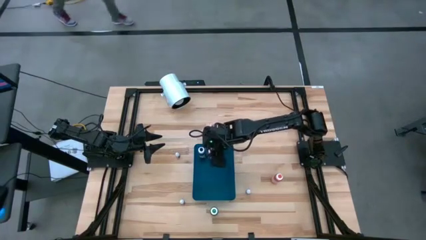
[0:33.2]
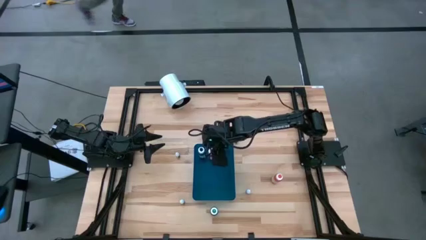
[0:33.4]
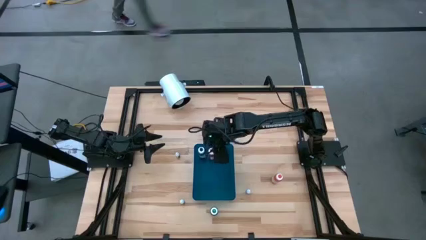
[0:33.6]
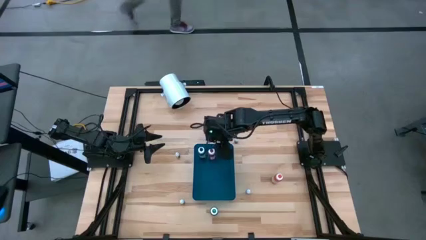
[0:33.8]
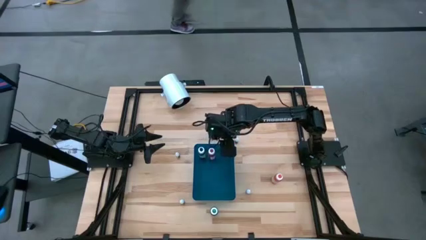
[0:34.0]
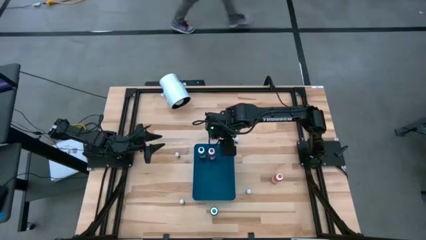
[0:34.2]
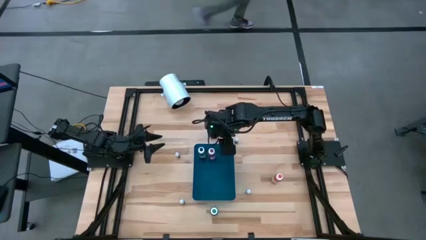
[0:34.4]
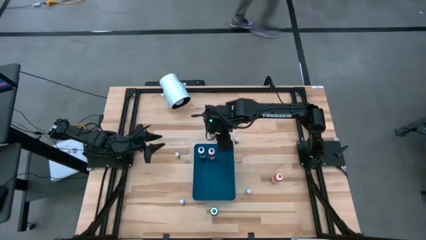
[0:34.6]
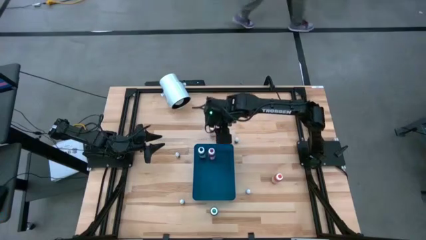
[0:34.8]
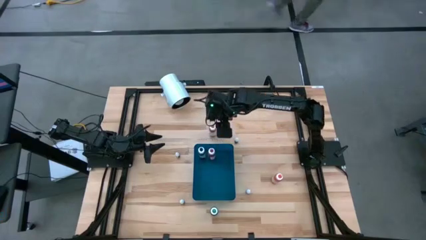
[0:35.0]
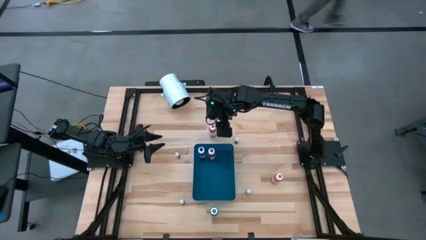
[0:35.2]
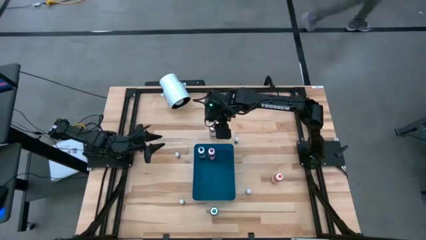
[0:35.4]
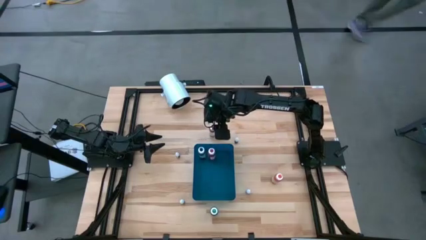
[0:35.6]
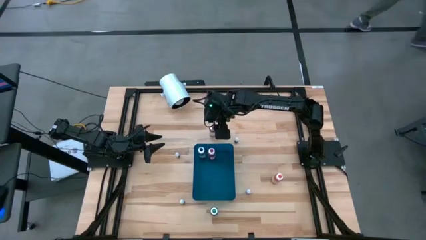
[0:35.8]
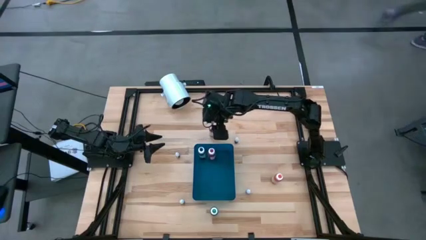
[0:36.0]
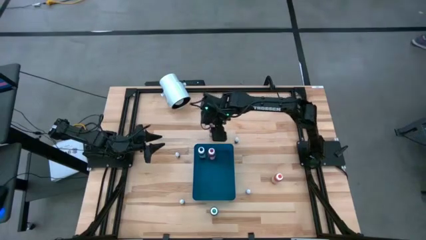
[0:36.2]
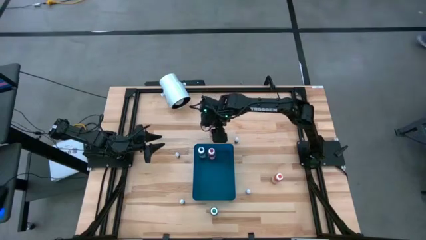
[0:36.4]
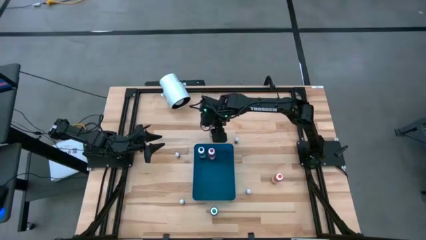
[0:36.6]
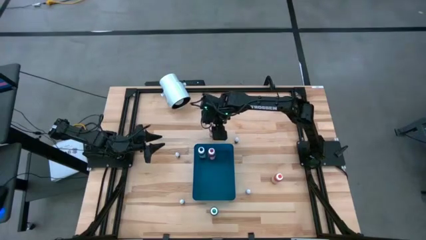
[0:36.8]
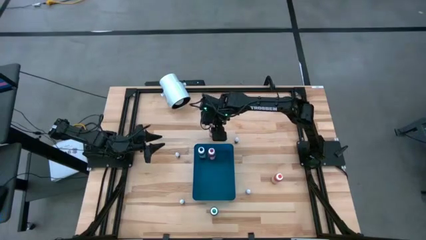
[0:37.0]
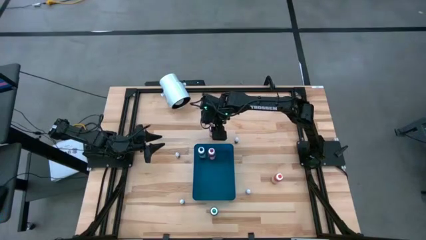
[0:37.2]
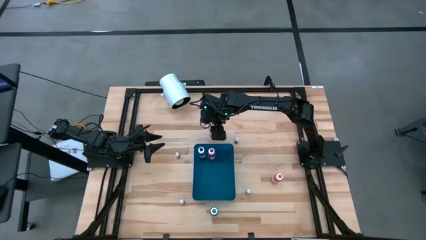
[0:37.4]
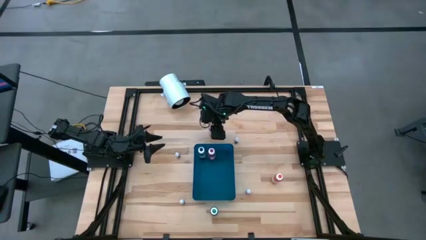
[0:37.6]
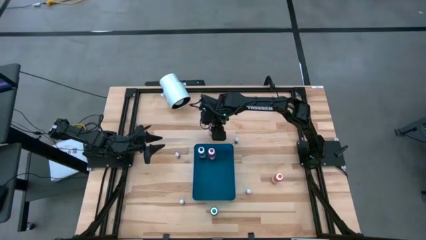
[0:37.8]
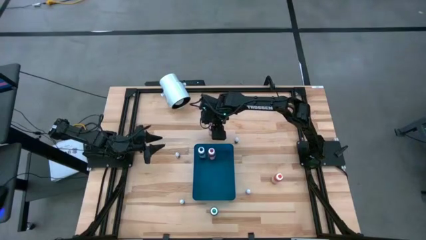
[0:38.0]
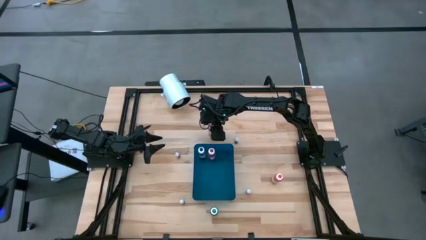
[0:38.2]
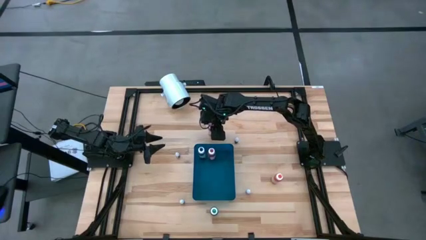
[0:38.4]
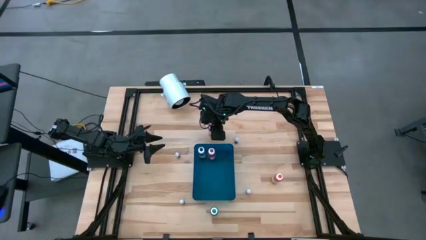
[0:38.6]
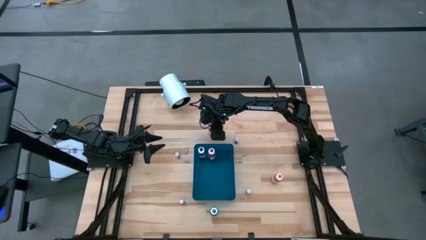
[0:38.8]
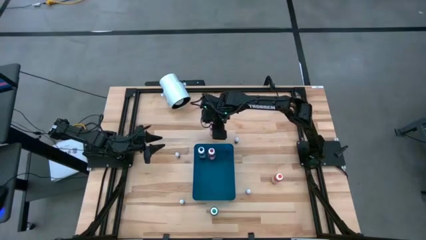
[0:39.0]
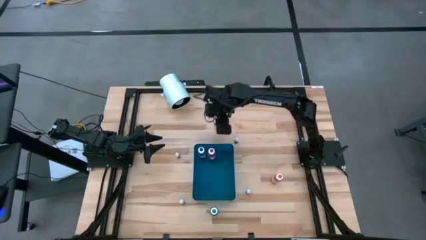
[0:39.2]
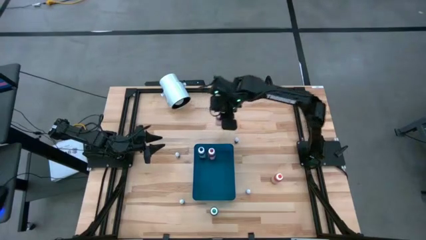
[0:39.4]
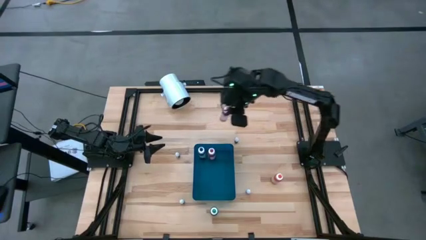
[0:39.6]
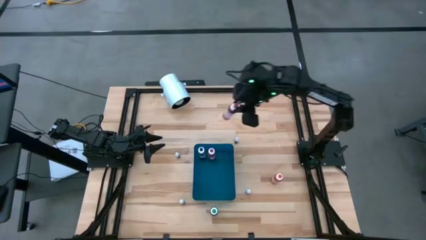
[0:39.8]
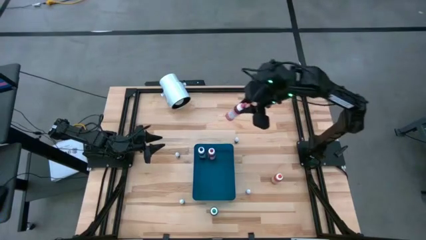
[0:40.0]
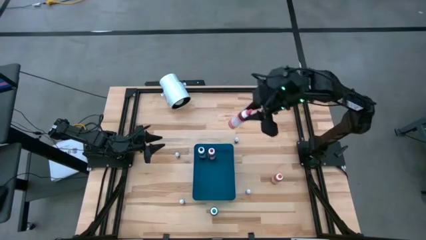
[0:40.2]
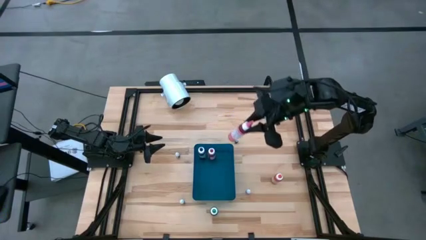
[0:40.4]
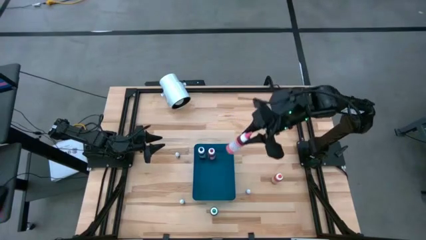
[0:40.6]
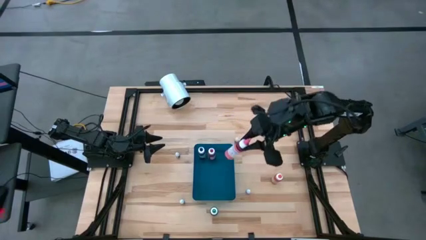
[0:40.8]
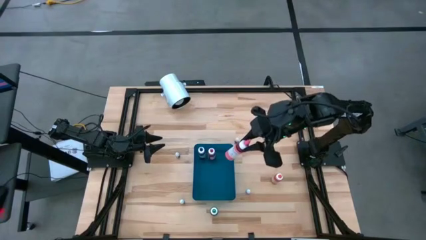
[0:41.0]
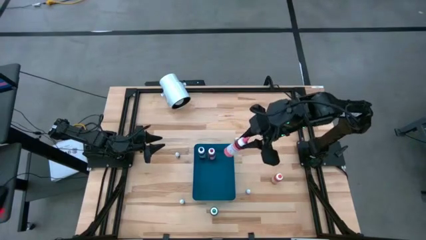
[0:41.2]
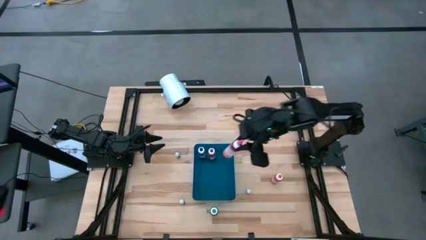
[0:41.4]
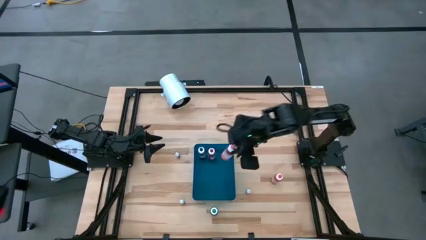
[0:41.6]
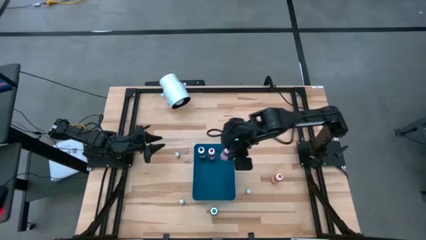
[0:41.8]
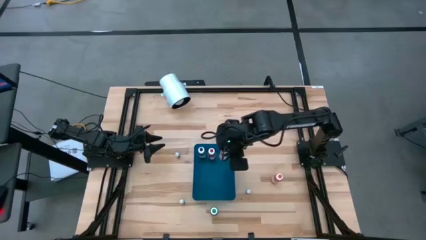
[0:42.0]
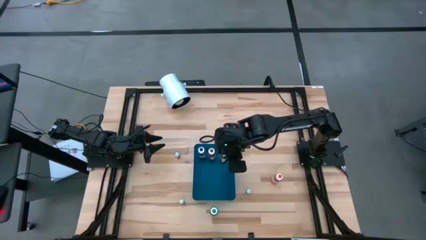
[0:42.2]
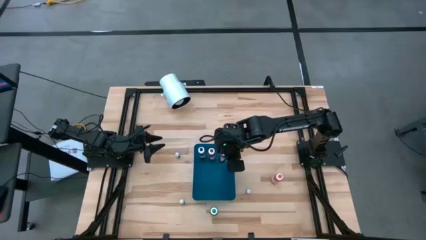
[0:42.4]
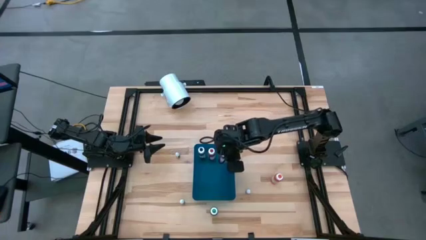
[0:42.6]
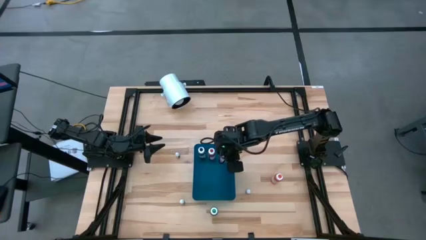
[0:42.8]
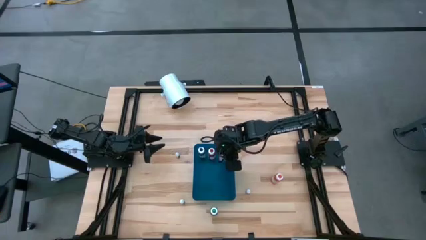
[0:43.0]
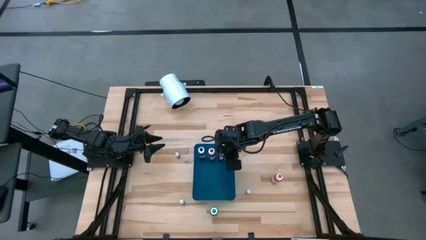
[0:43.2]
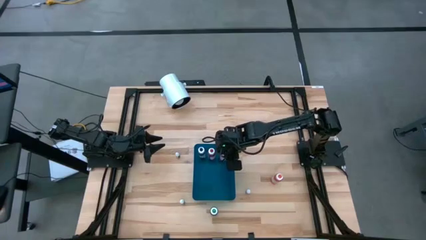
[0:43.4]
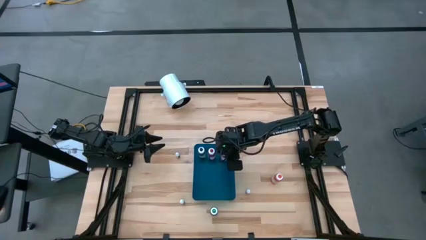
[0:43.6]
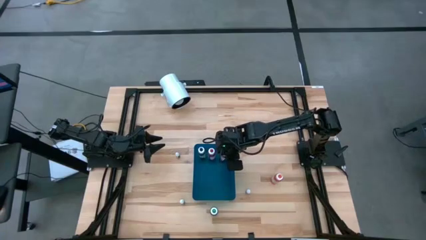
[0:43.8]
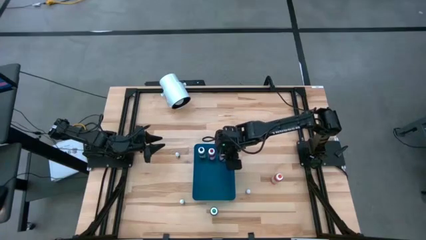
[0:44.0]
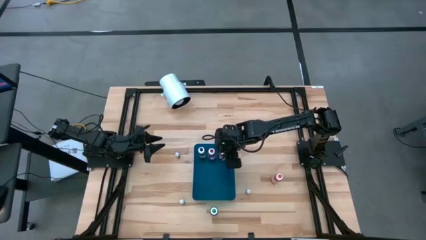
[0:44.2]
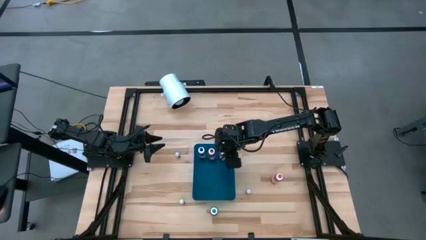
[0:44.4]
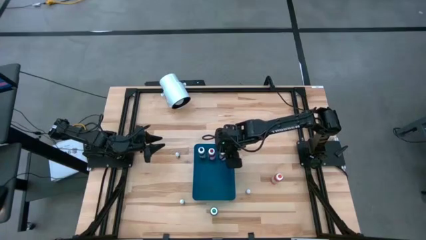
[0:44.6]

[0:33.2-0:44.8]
Task: Pick & Place food coloring
Put the large pink food coloring bottle into the blue bin
